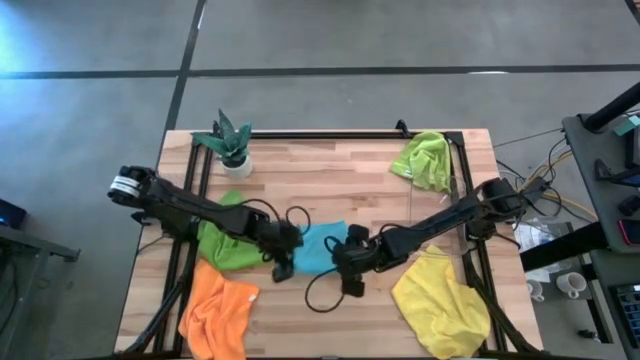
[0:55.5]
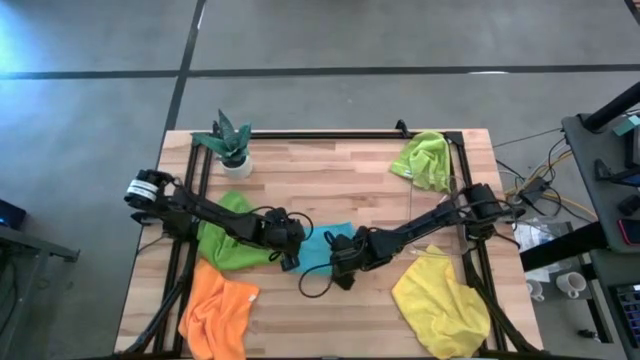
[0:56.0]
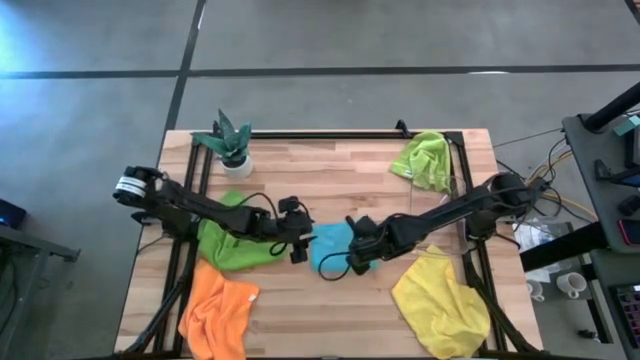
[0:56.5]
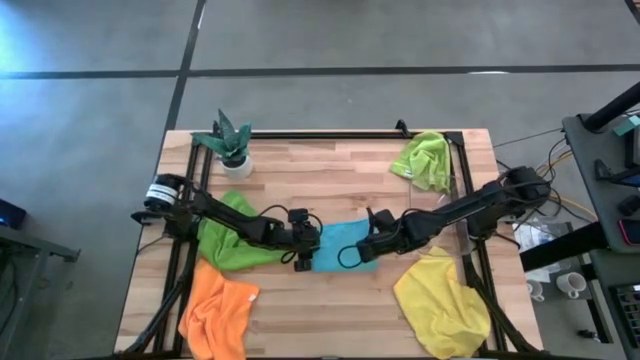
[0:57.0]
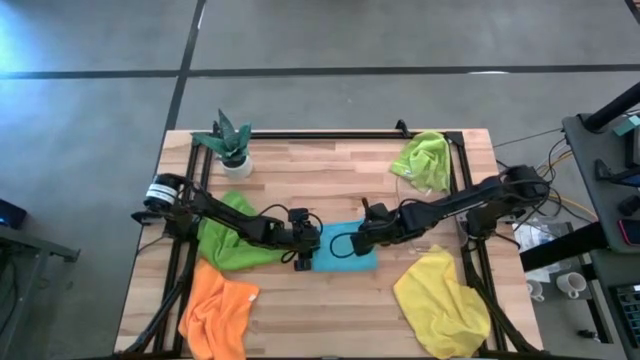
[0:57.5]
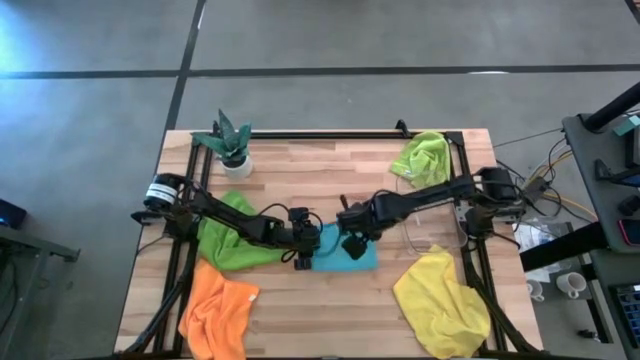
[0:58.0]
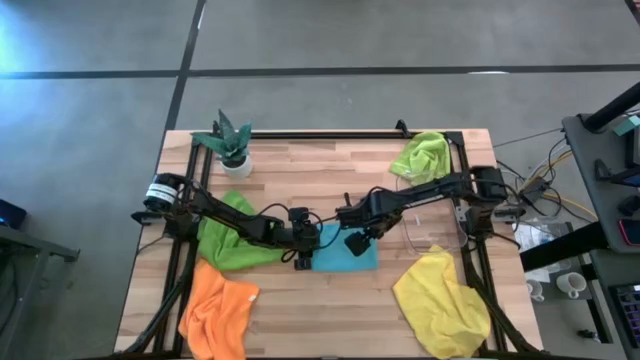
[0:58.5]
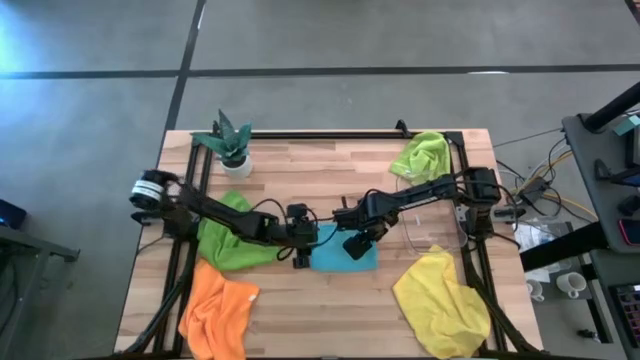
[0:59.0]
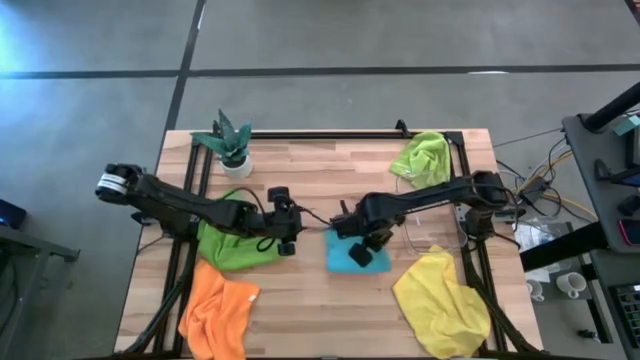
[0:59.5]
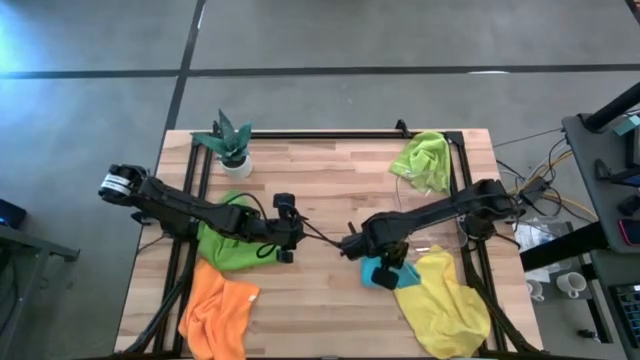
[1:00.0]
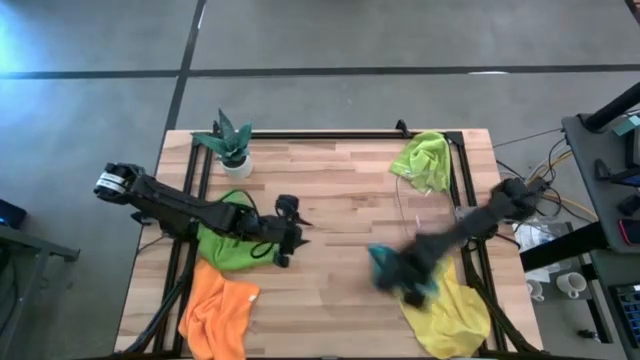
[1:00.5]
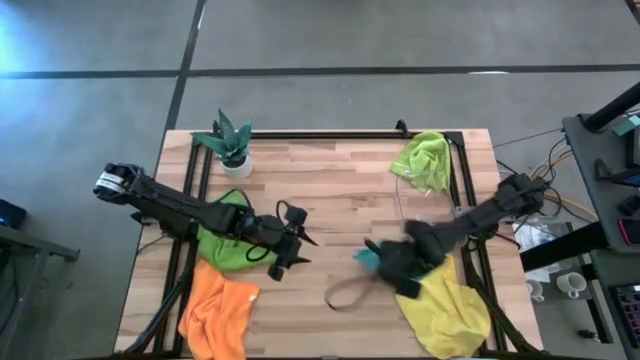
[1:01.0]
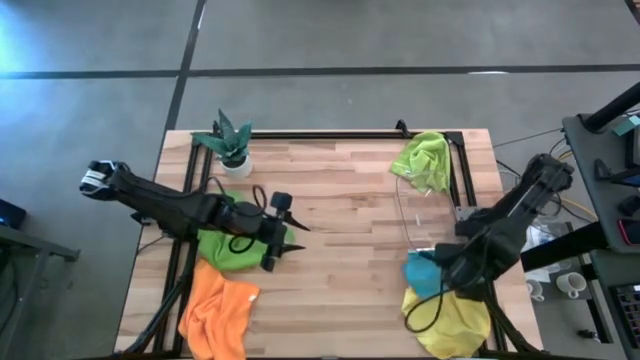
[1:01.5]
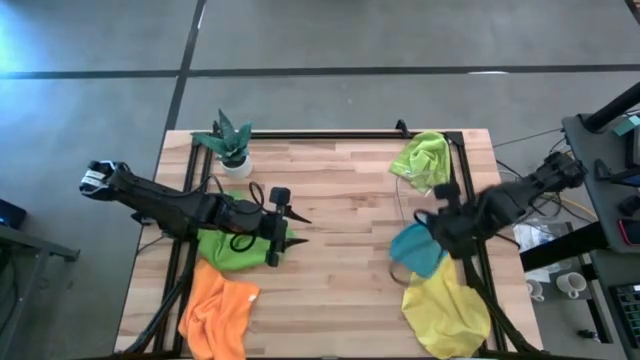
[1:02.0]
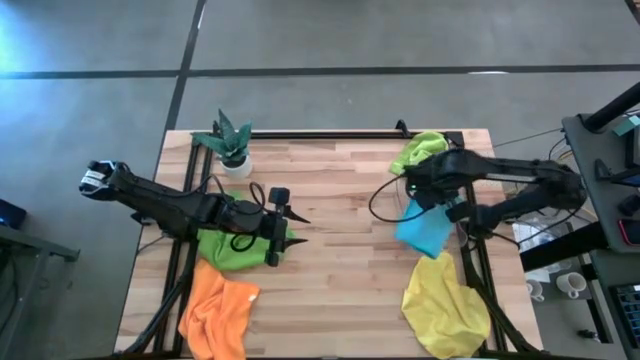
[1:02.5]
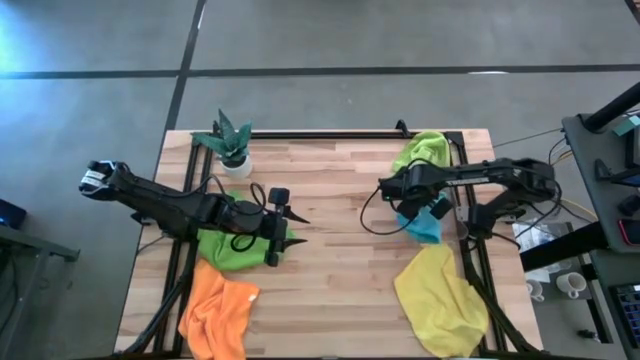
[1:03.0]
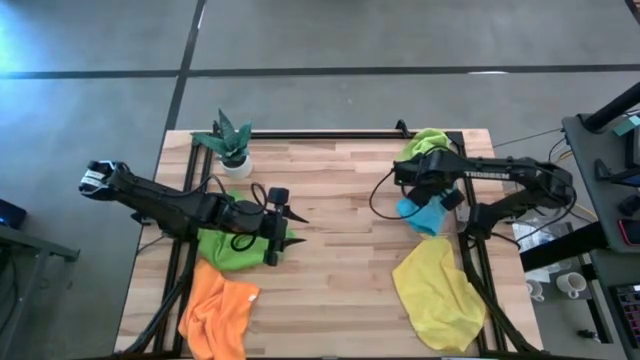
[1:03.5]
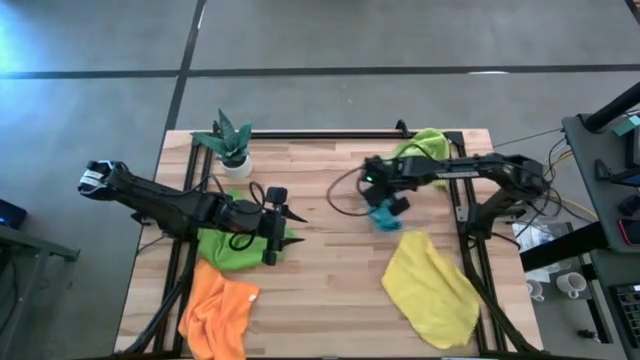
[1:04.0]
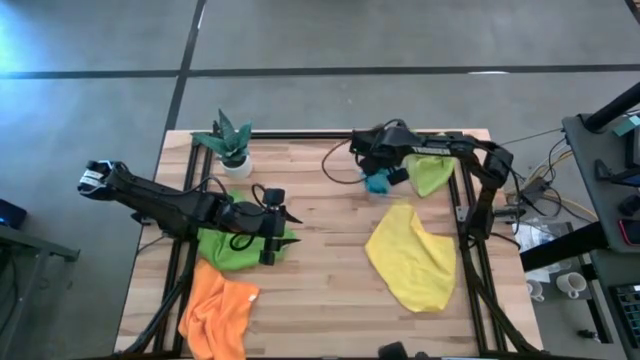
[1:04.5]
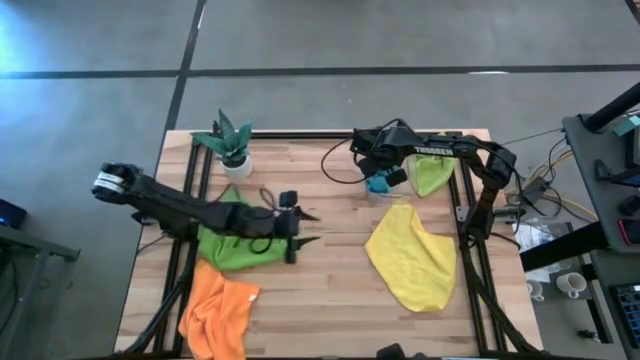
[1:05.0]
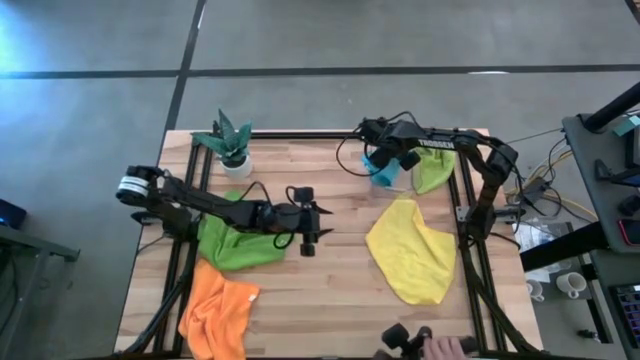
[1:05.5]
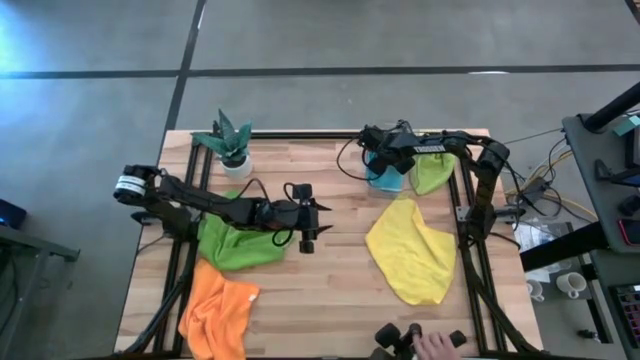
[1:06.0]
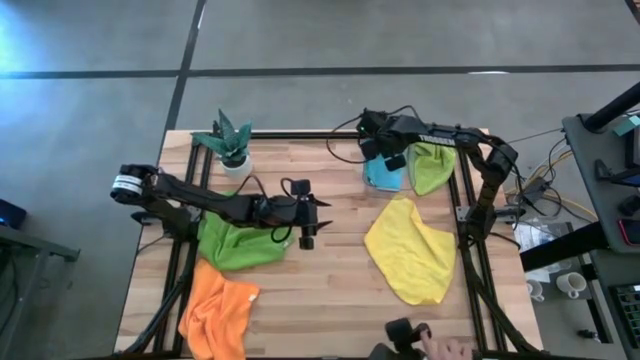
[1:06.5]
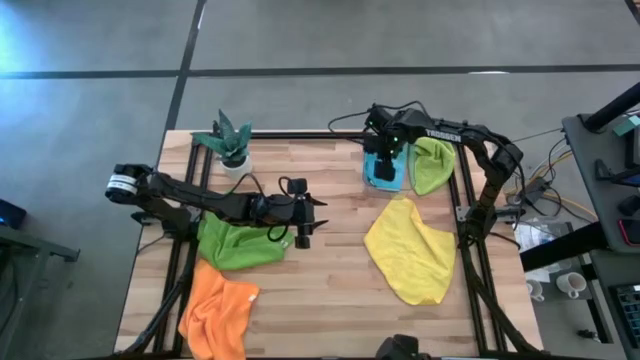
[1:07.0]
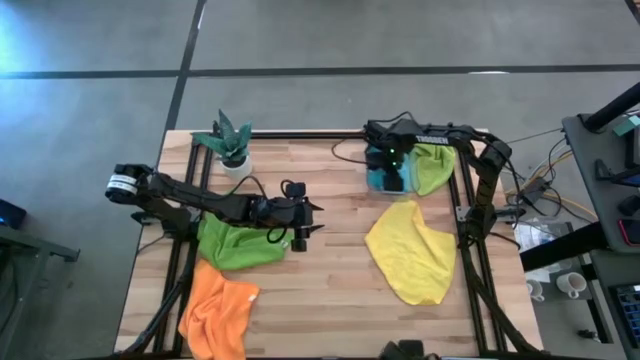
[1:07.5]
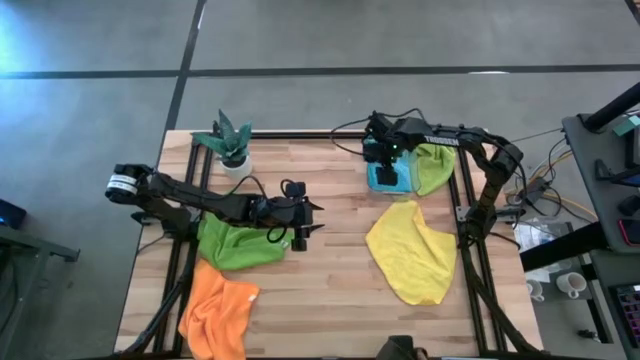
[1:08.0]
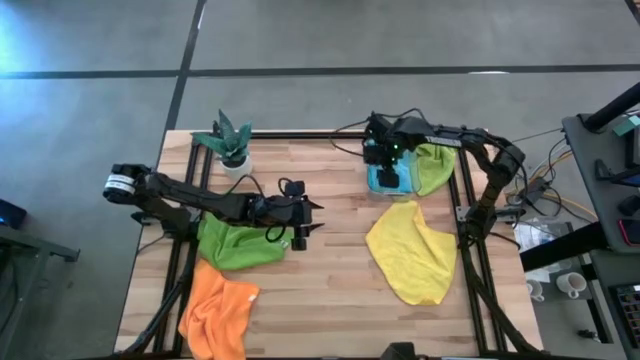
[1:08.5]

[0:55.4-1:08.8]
Task: Fold microfiber towels
Put the blue microfiber cloth into the transparent bin
